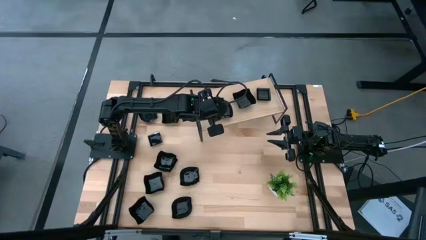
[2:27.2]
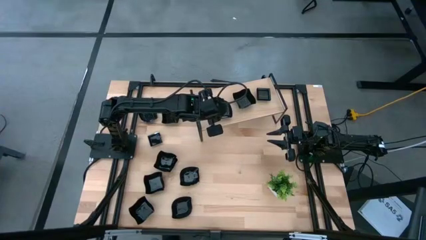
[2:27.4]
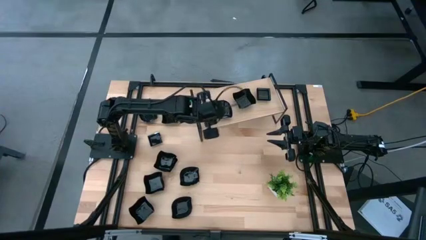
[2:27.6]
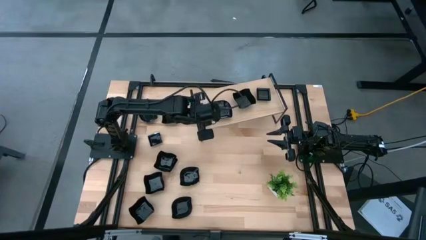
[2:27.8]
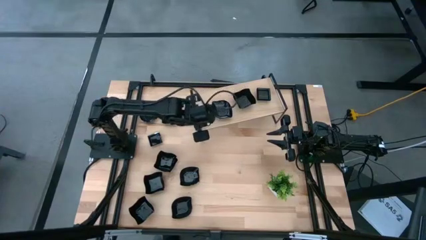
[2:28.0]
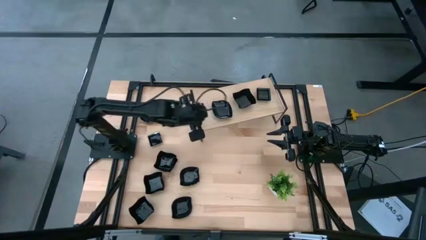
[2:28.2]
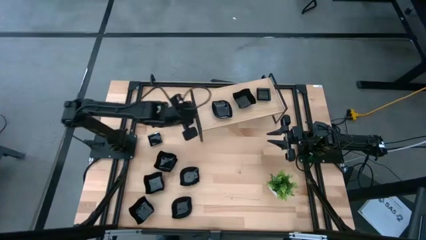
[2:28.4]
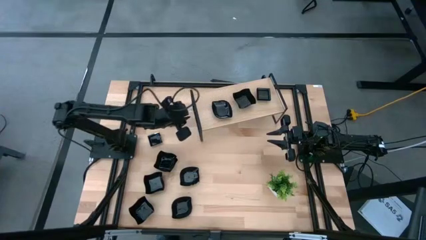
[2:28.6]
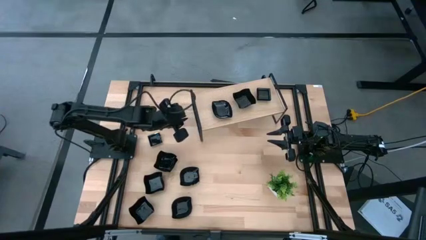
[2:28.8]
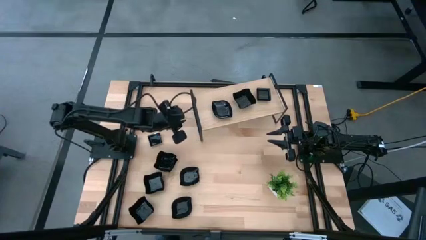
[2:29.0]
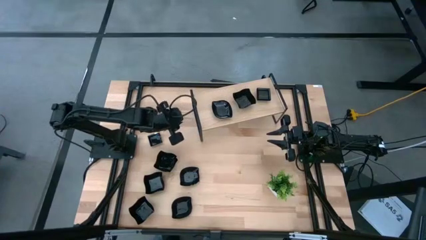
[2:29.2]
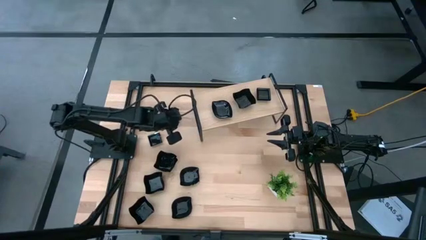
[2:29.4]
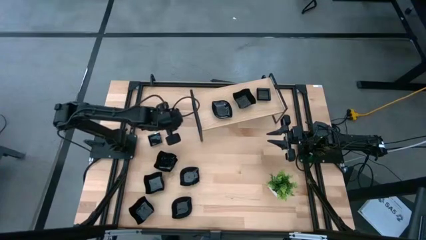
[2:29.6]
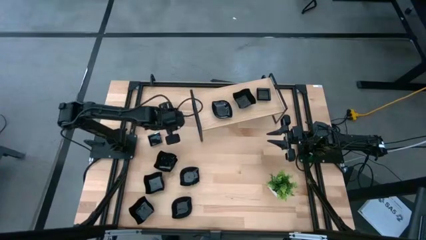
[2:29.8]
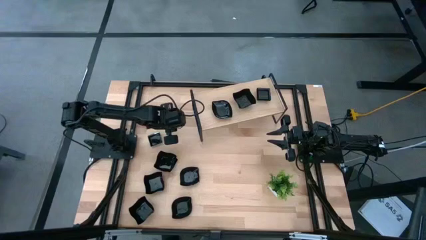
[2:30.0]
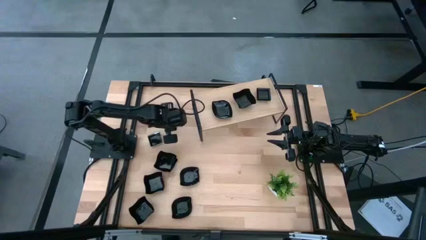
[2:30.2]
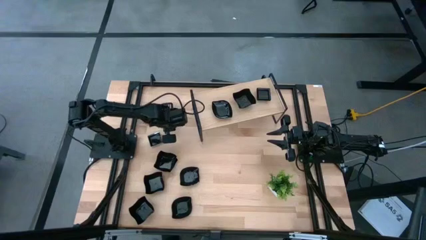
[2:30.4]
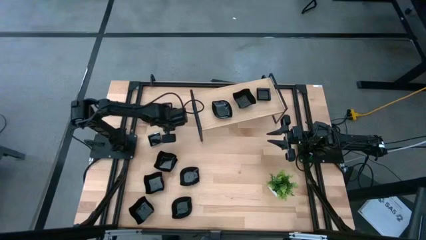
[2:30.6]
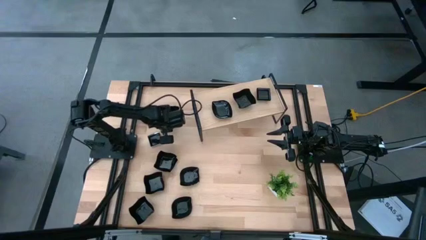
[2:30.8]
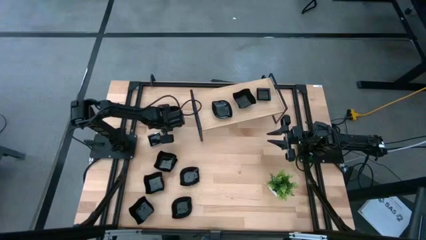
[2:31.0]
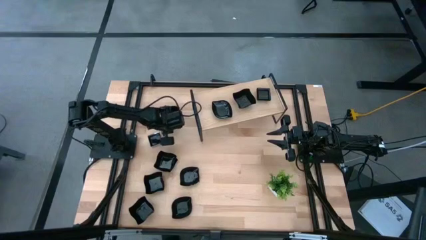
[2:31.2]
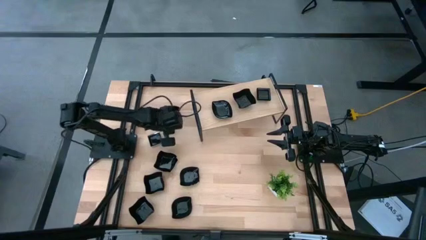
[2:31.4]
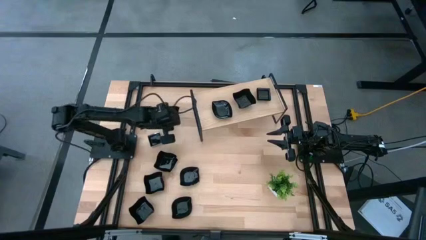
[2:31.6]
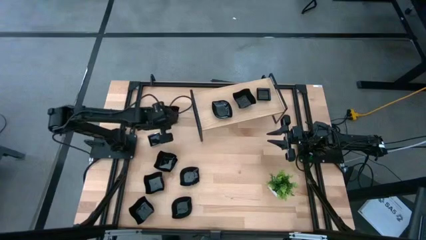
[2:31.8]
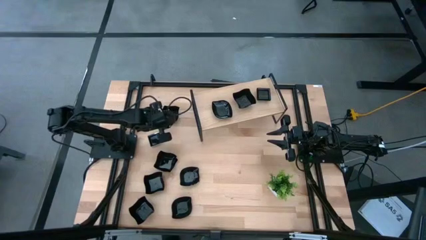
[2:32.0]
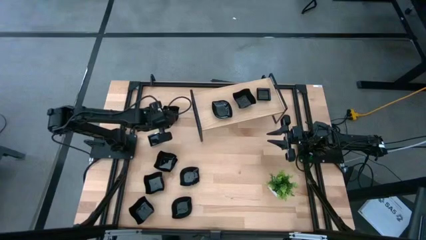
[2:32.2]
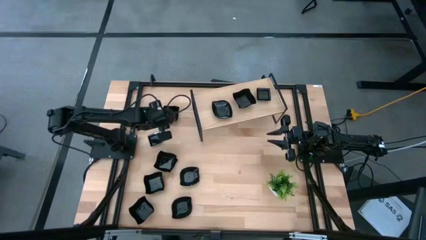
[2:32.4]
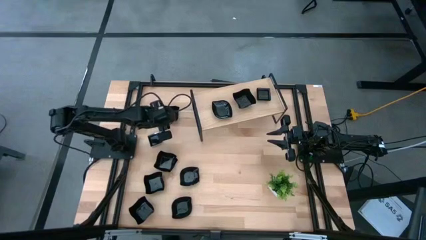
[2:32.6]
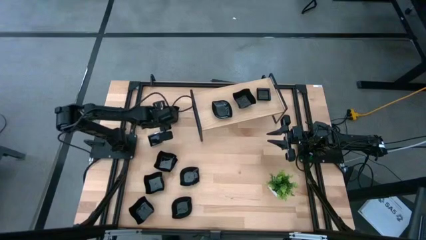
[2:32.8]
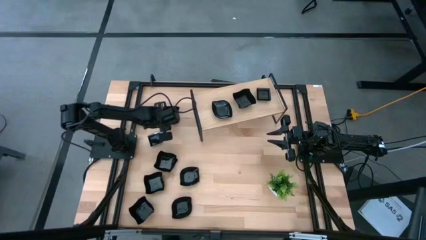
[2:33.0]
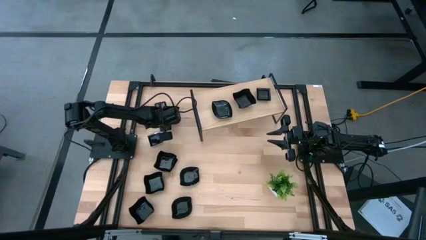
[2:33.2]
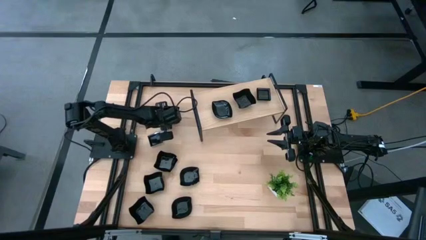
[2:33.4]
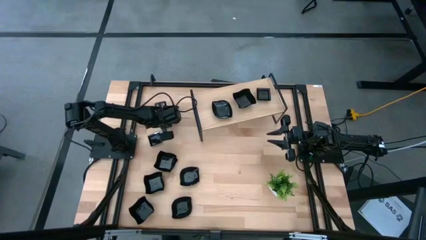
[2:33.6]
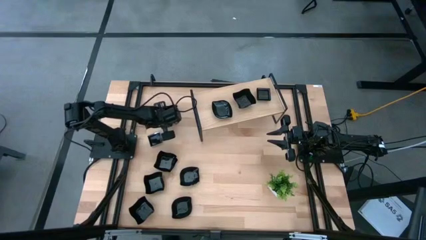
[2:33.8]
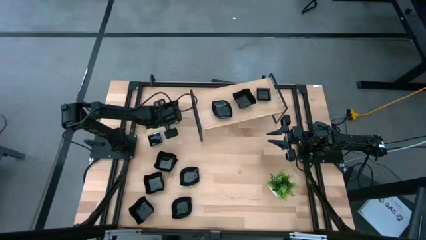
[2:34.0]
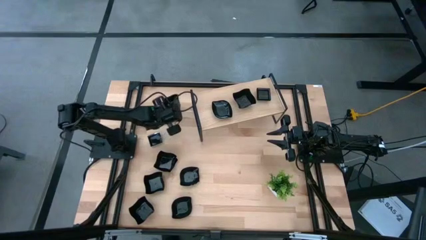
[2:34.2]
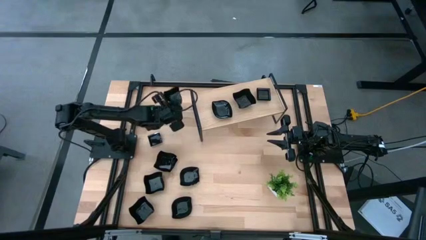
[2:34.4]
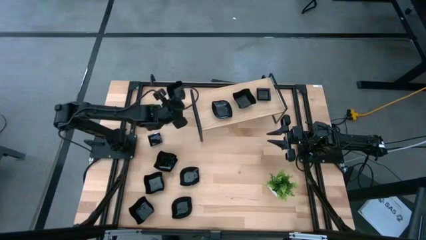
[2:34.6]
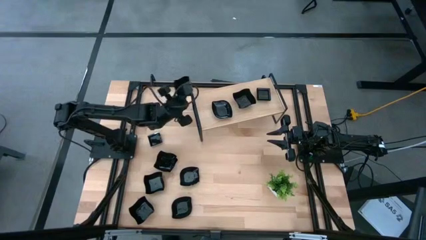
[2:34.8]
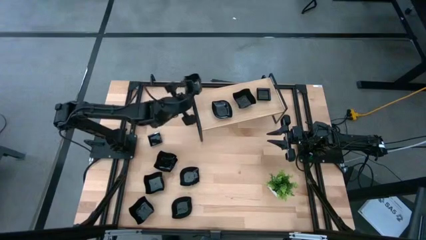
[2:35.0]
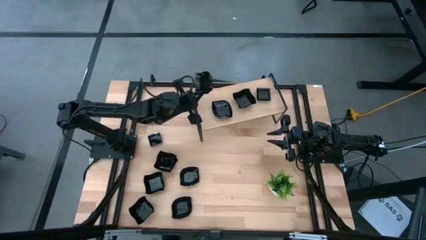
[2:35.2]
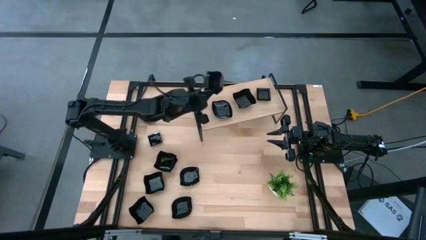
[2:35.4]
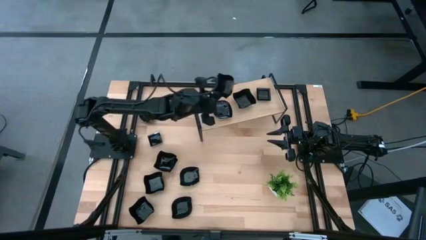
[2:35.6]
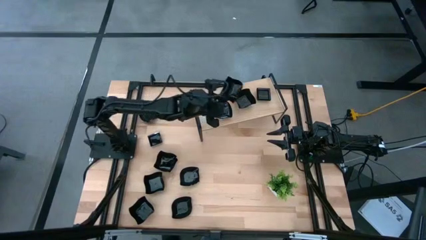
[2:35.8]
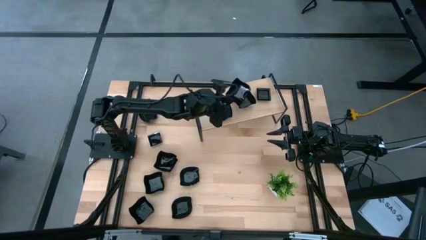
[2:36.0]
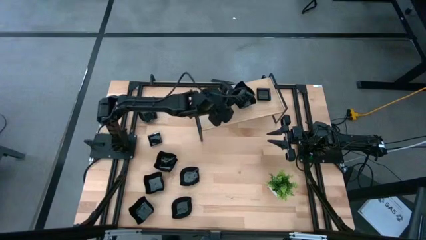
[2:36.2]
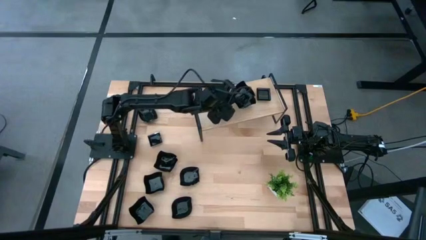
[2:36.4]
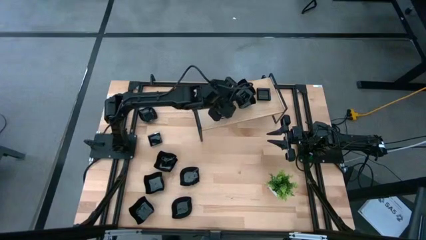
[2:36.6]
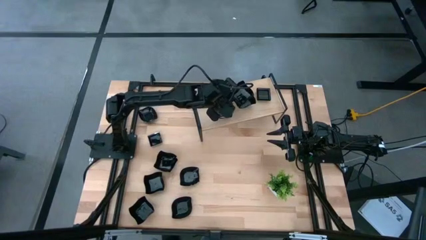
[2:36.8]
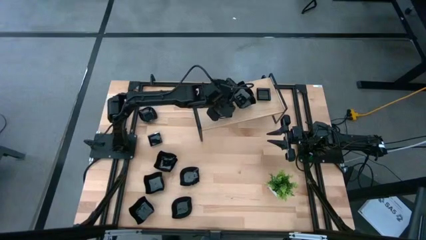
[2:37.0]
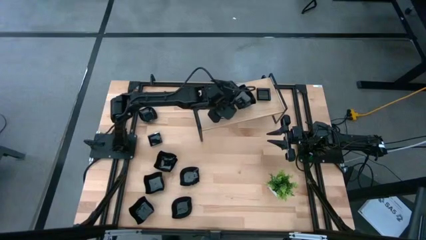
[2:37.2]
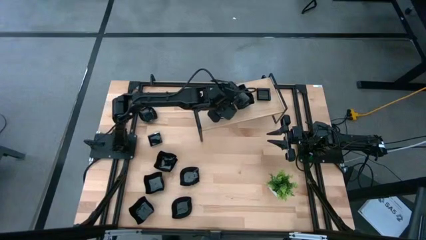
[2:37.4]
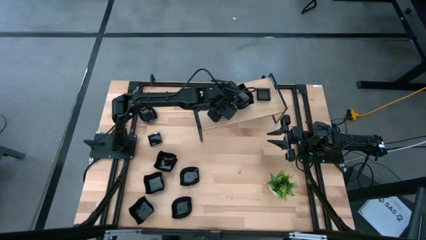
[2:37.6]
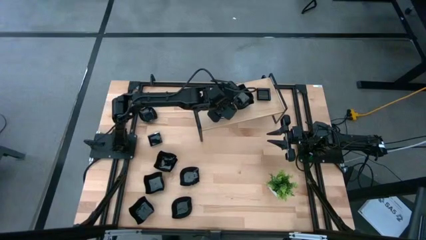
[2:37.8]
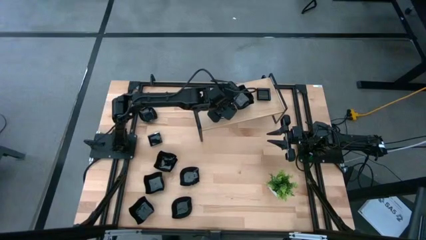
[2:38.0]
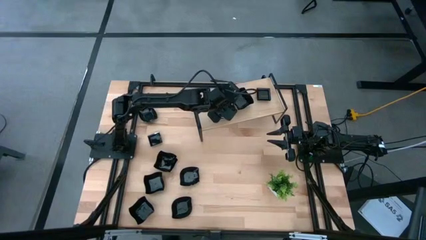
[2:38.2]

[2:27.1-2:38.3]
Task: Pick & Place Mini shaped plates
Stack the distorted square plate on top of the distorted square plate on the shelf

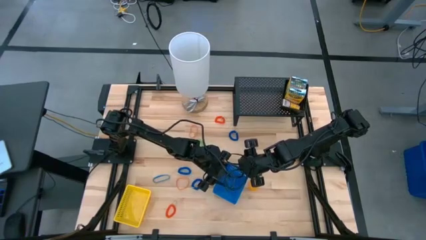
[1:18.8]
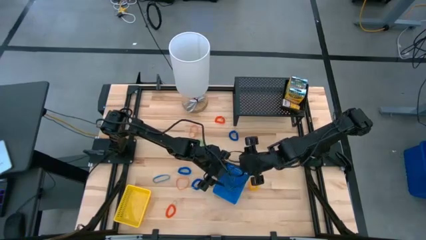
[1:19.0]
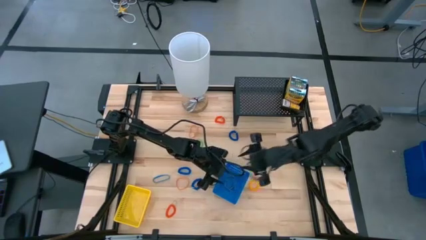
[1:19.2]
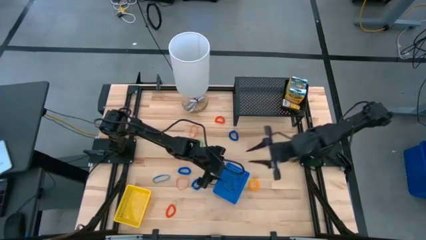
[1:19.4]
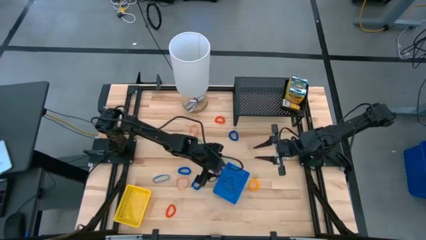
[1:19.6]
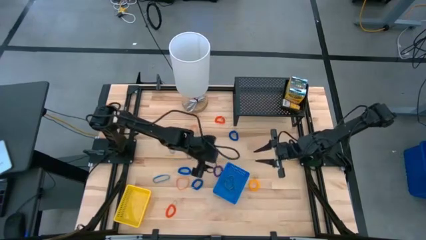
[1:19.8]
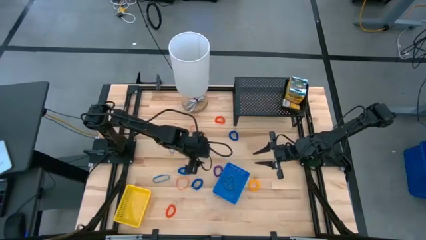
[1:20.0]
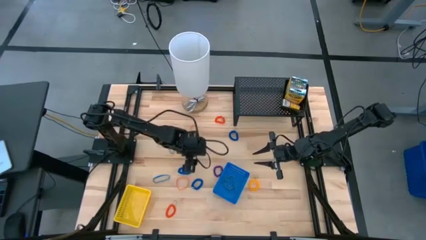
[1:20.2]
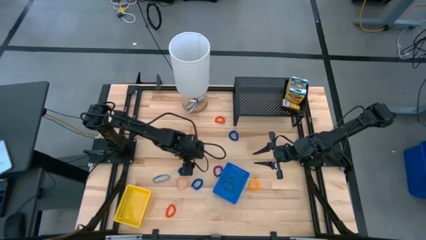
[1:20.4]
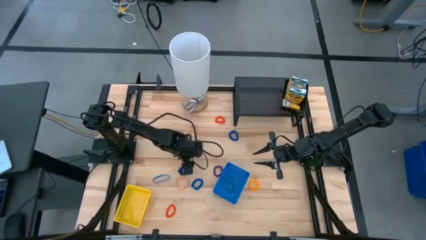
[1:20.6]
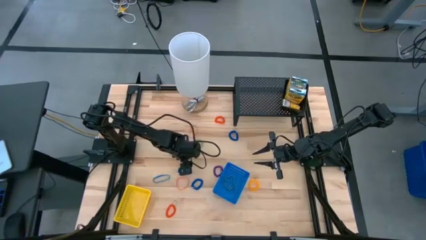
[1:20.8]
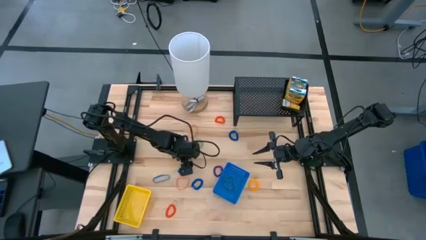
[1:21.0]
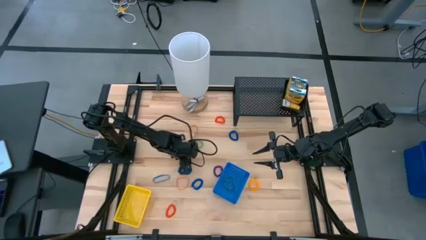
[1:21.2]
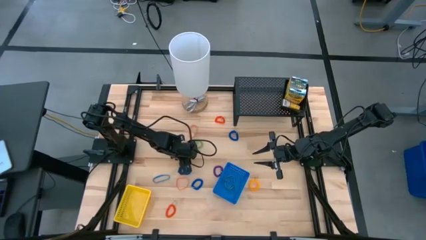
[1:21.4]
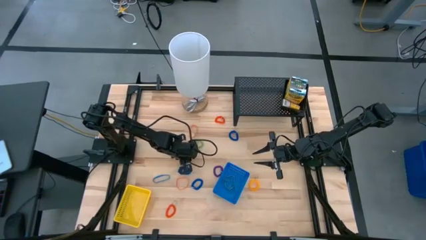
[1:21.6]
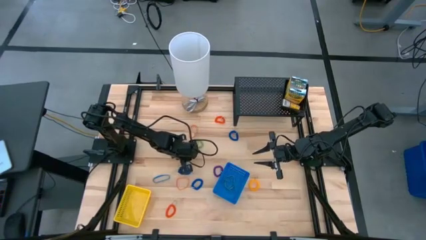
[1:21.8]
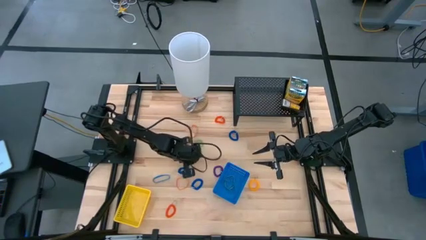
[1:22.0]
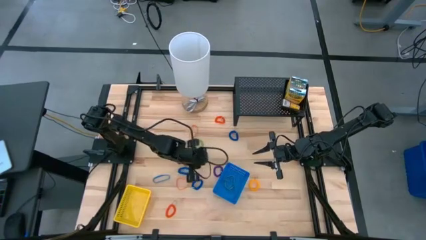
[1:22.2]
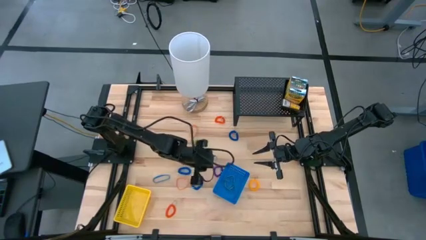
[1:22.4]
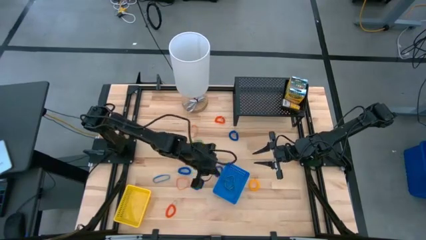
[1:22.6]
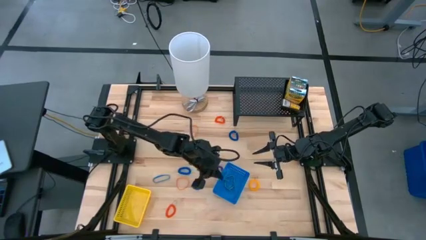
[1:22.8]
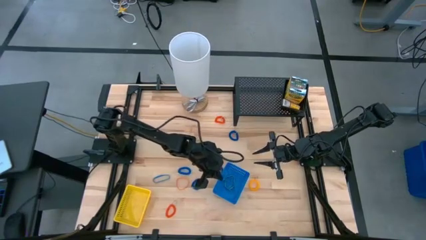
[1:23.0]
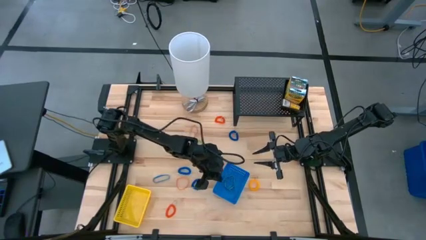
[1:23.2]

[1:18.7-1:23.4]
Task: Pick & Place Office Desk Supplies
Put the blue rubber band into the blue bin
